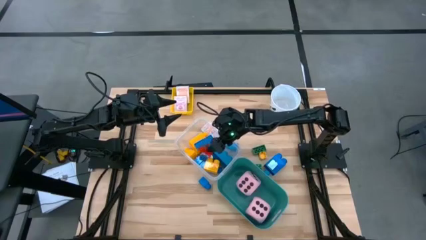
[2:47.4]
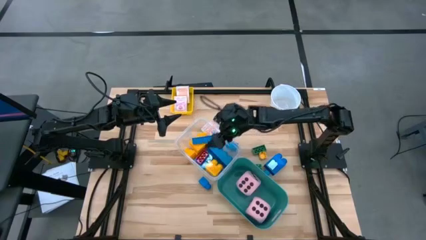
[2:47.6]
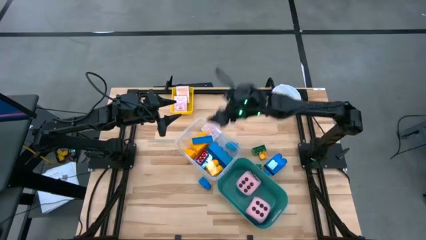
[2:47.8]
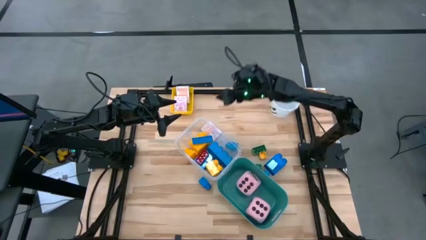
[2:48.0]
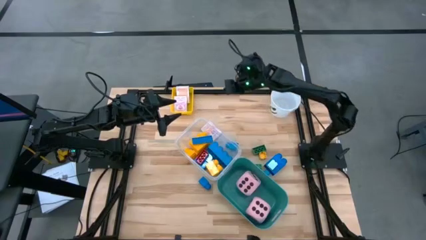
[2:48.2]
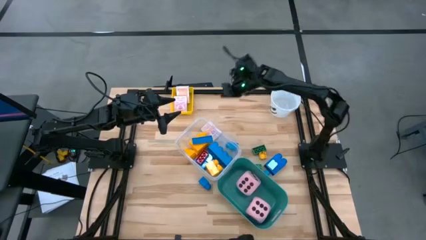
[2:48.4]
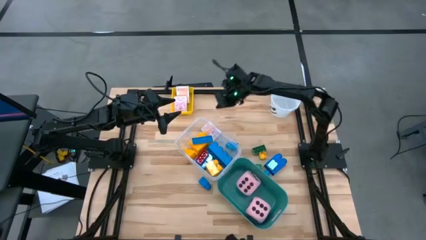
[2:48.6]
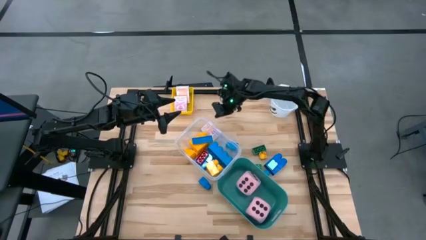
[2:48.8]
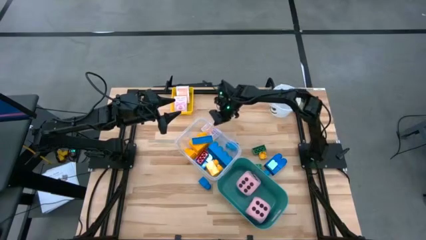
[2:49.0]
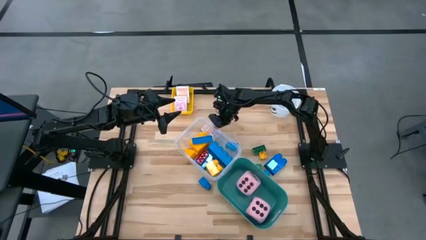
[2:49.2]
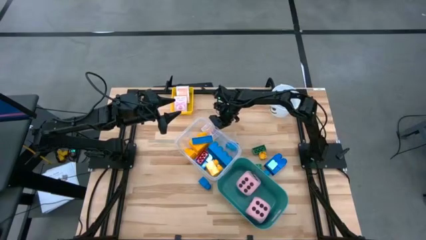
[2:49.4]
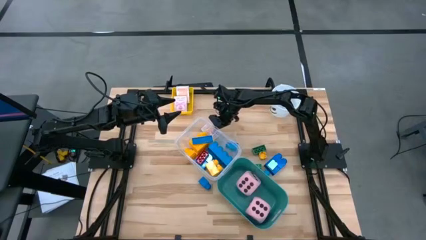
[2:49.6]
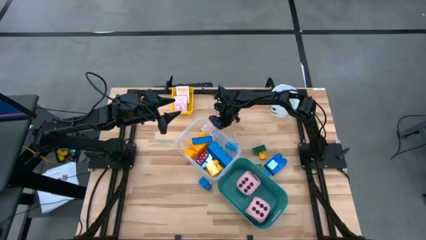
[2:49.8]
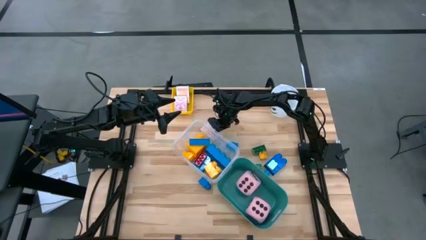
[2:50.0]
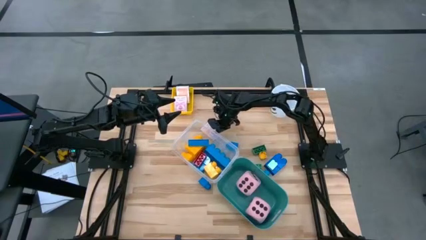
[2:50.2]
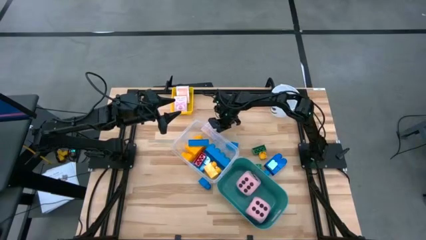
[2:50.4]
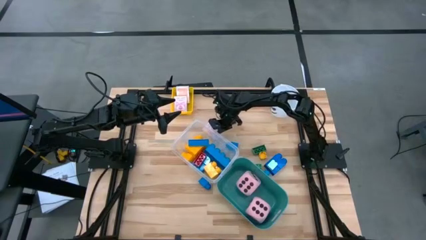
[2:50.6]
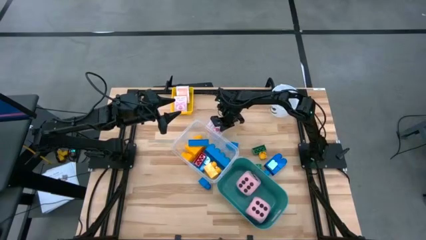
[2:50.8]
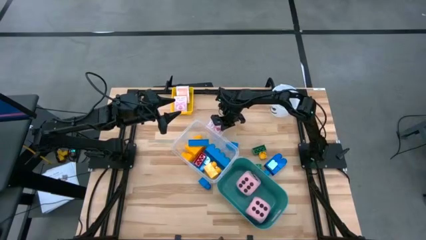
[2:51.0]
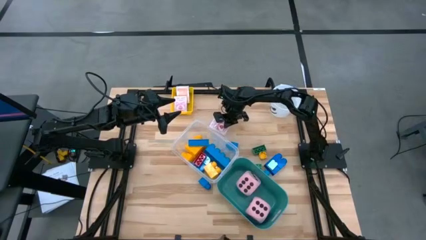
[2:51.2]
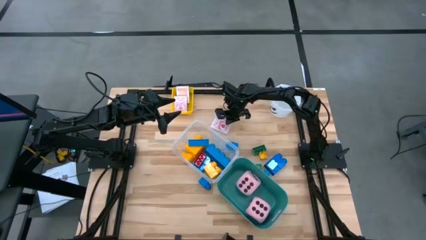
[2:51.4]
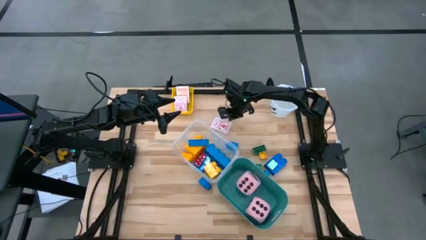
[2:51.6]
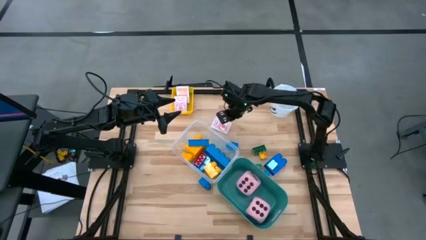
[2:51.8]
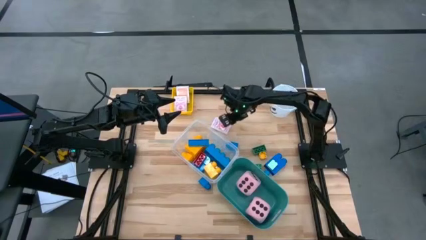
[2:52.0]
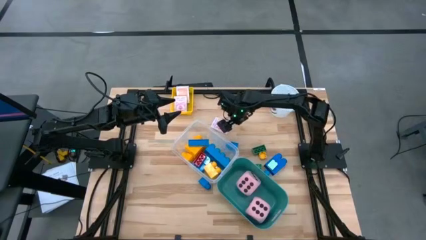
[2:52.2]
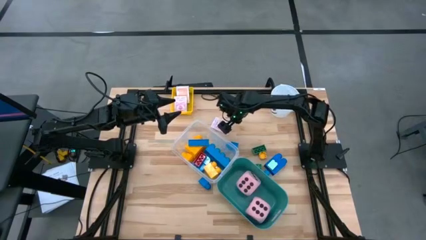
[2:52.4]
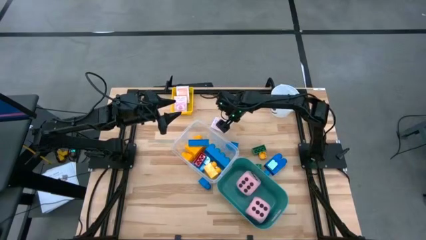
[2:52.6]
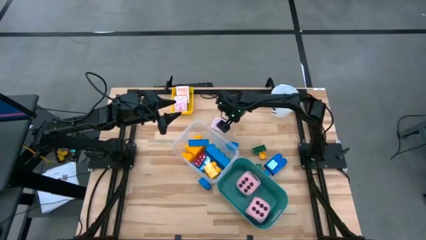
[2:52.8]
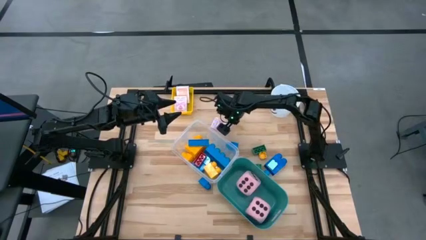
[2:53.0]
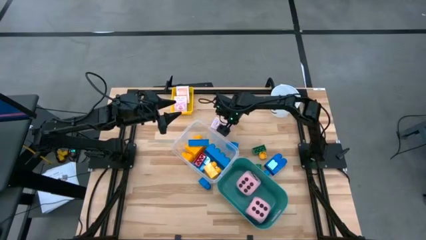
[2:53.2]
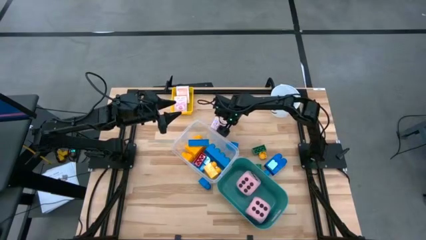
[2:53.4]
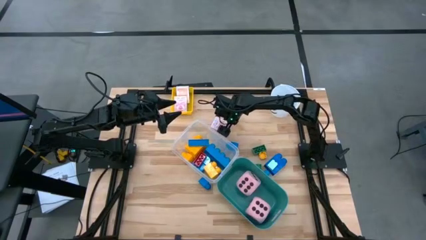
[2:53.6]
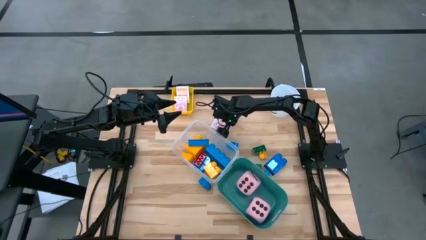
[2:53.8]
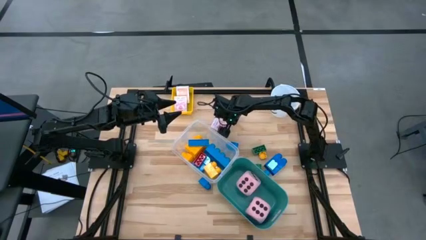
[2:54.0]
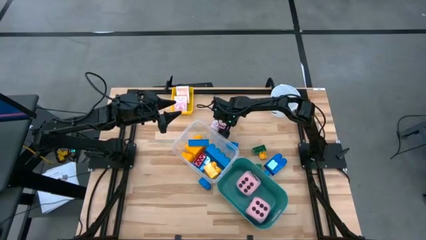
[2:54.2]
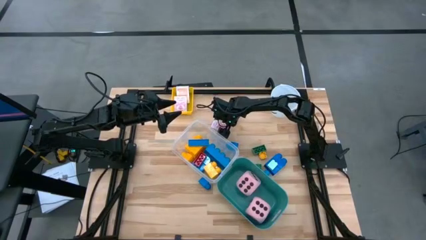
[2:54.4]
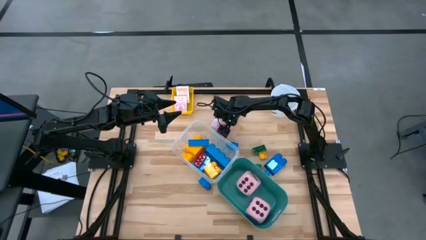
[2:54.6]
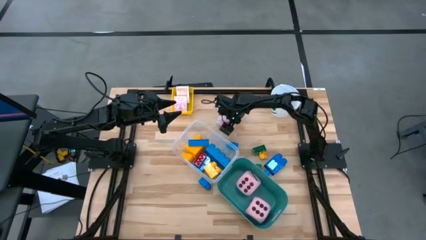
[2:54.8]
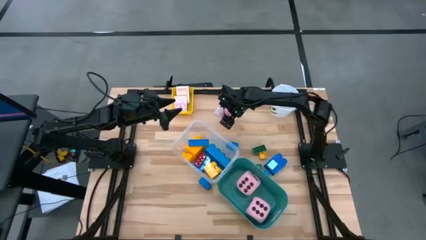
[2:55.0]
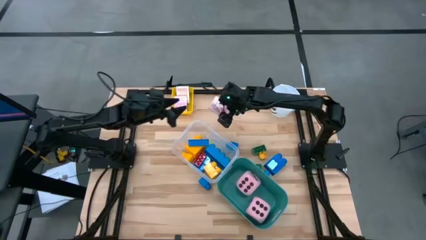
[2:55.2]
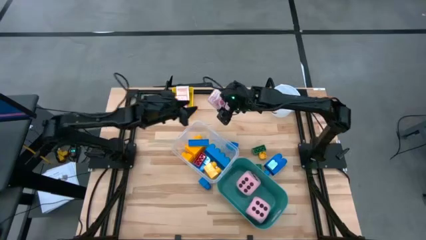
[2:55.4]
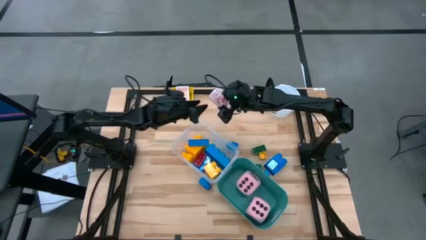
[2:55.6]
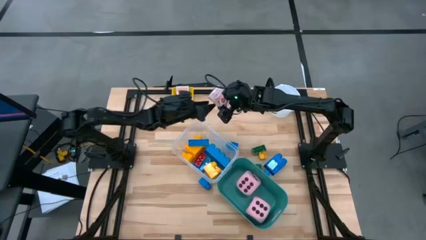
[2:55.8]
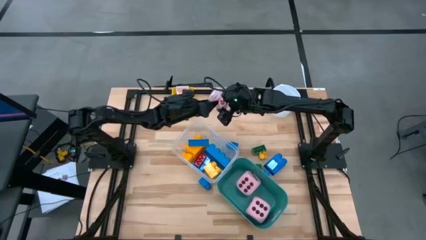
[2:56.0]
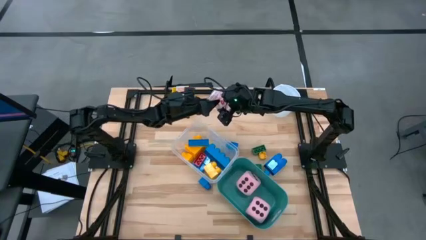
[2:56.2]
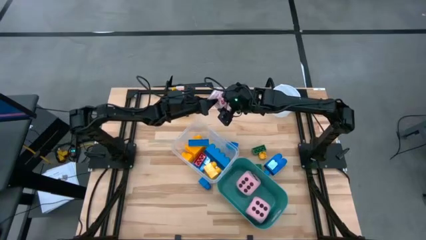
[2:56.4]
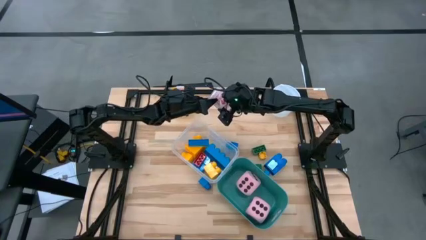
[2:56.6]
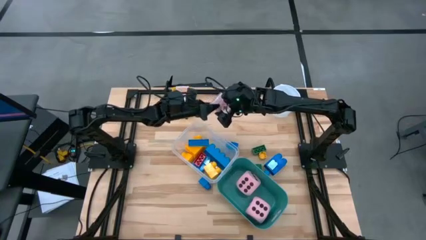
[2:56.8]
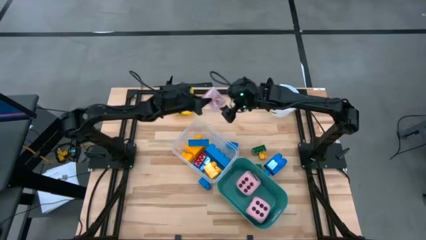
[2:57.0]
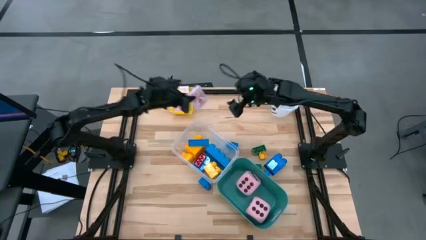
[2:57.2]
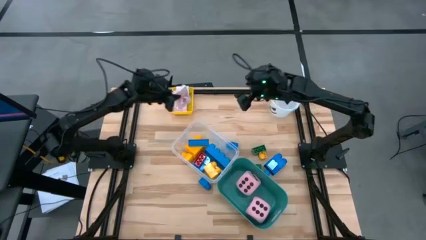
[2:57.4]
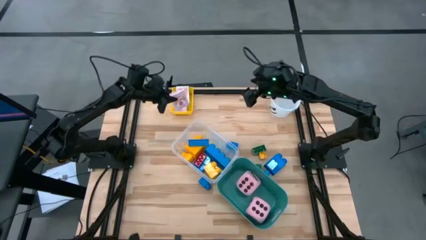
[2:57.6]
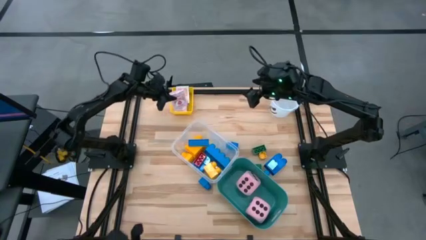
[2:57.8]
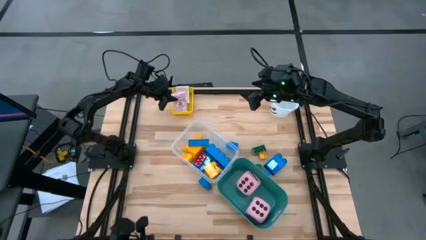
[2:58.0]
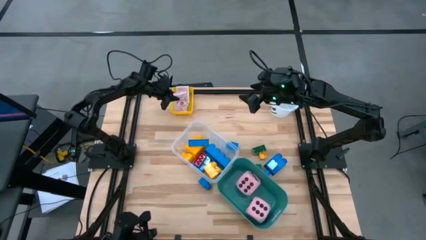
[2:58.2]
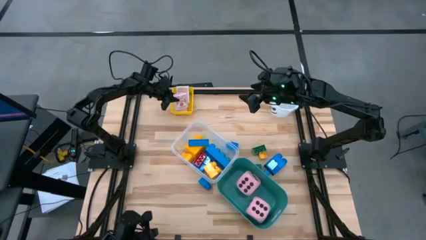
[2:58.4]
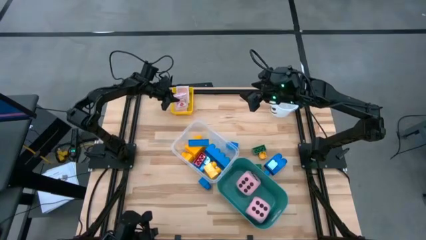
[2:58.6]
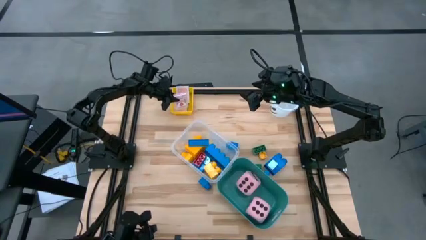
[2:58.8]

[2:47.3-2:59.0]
Task: Pick & Place Toys
Put the red deck of cards into the yellow bin
